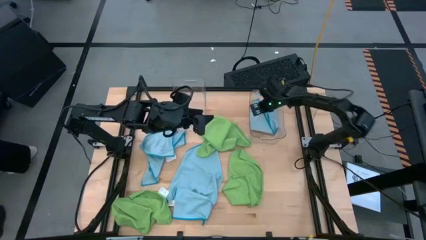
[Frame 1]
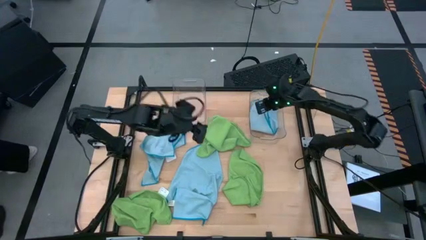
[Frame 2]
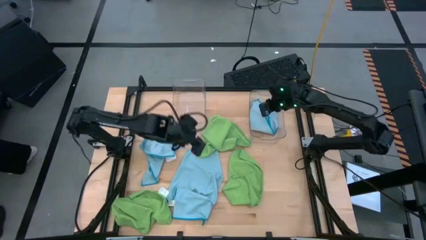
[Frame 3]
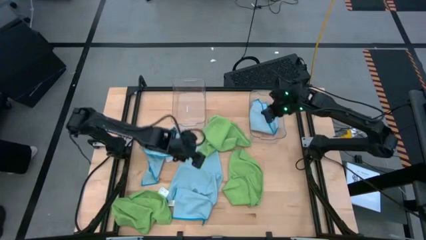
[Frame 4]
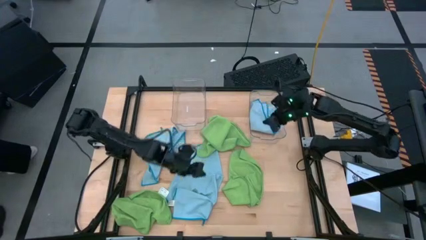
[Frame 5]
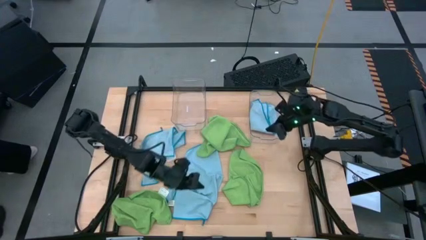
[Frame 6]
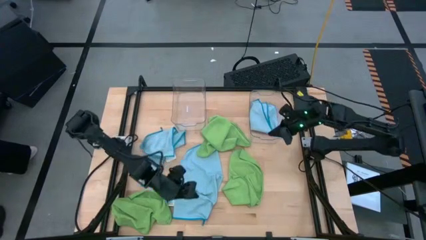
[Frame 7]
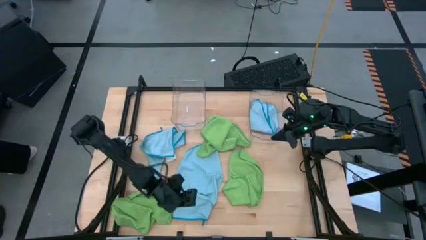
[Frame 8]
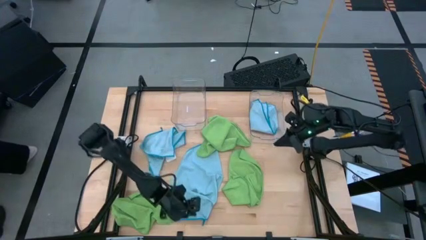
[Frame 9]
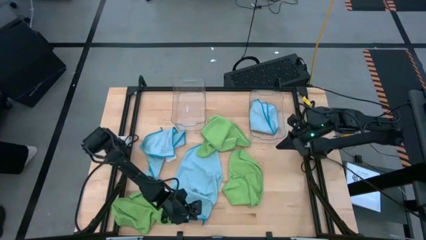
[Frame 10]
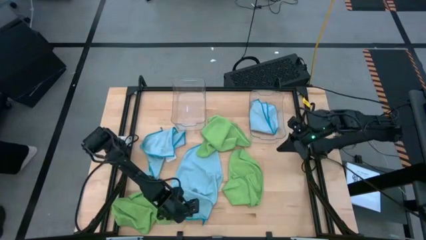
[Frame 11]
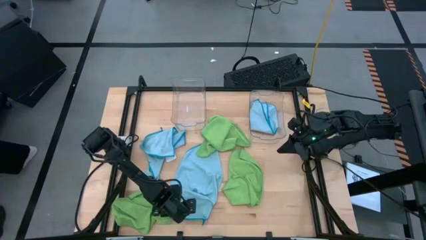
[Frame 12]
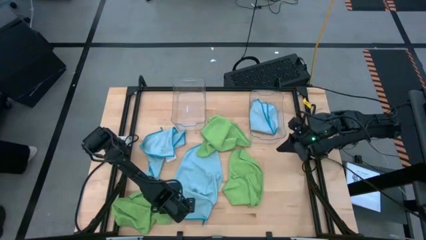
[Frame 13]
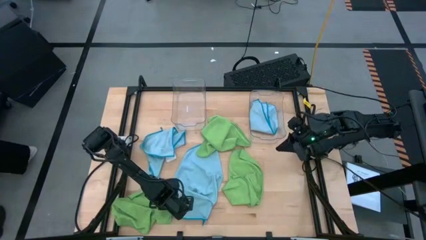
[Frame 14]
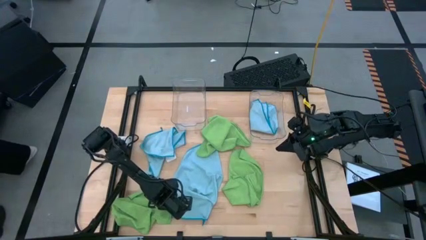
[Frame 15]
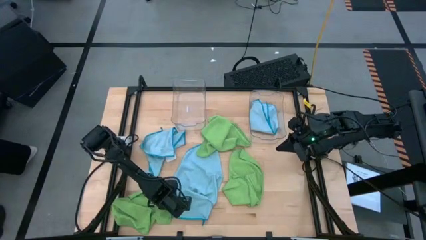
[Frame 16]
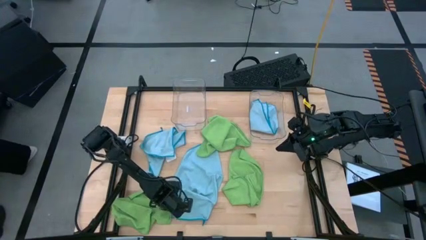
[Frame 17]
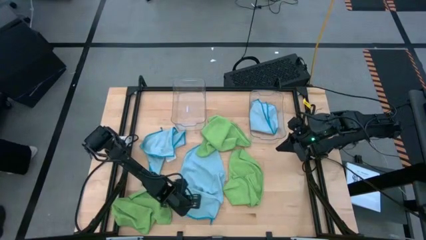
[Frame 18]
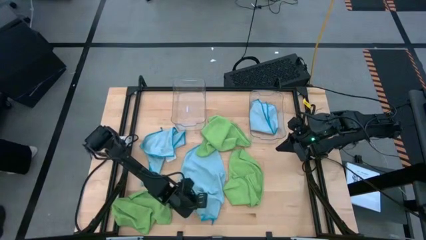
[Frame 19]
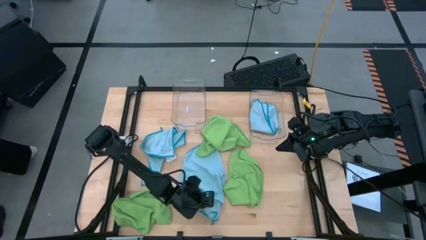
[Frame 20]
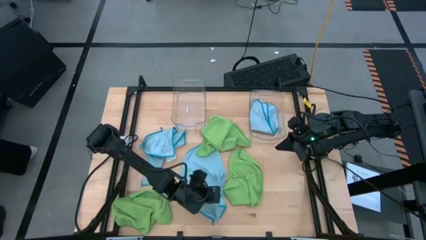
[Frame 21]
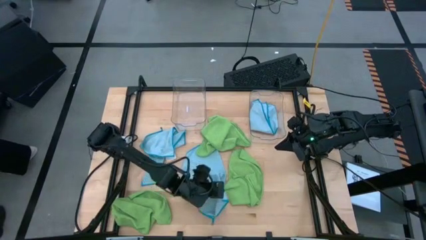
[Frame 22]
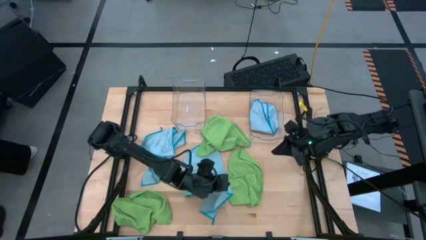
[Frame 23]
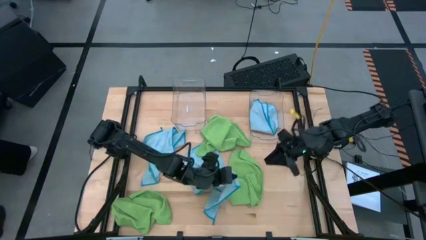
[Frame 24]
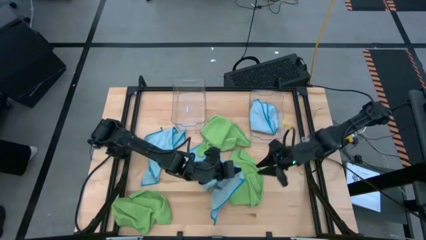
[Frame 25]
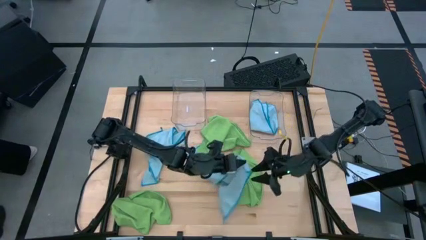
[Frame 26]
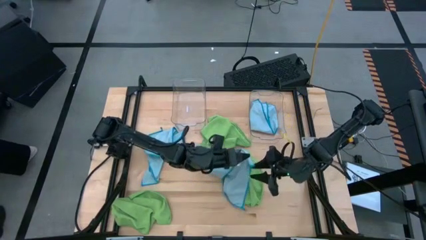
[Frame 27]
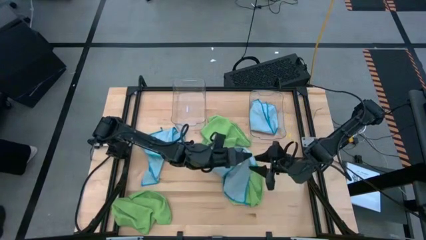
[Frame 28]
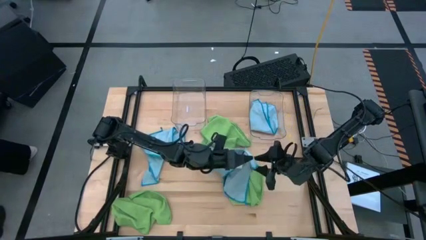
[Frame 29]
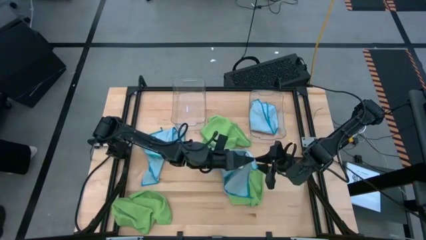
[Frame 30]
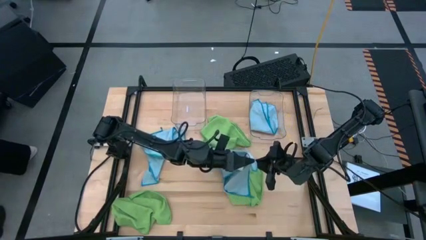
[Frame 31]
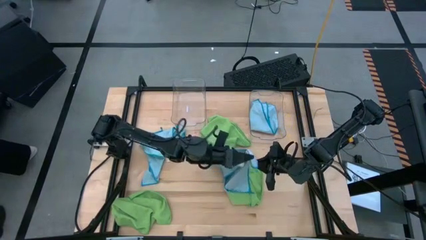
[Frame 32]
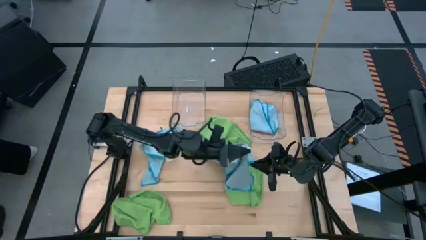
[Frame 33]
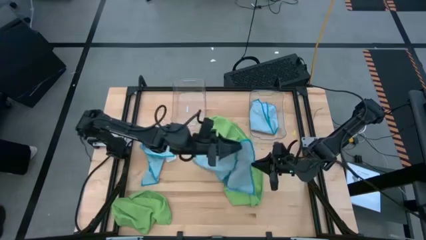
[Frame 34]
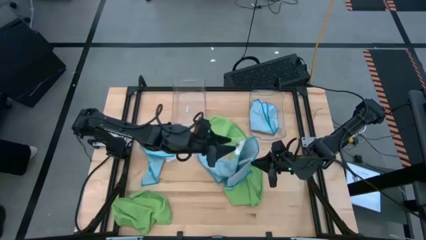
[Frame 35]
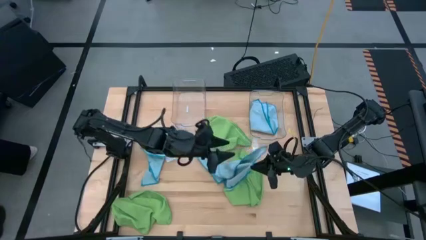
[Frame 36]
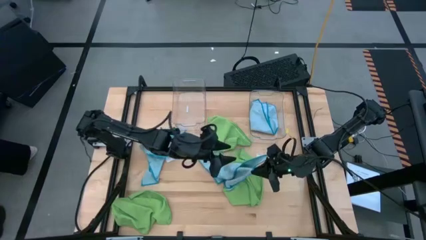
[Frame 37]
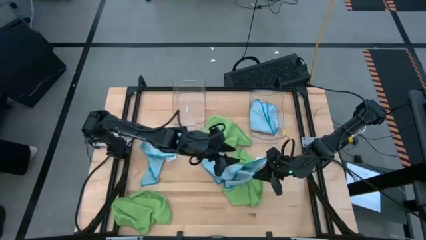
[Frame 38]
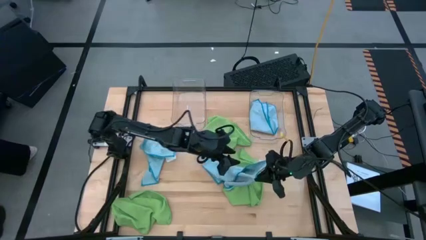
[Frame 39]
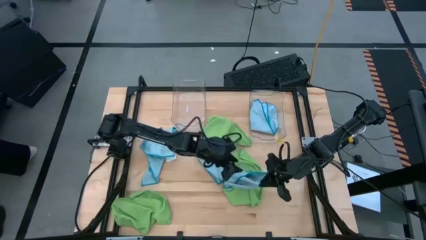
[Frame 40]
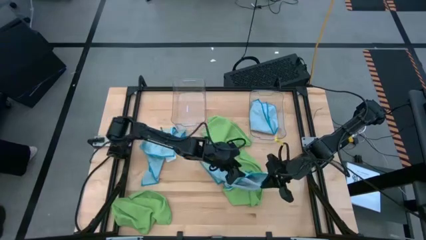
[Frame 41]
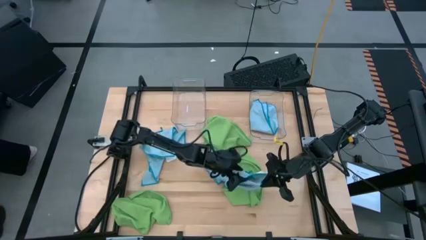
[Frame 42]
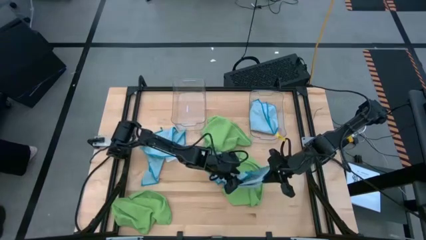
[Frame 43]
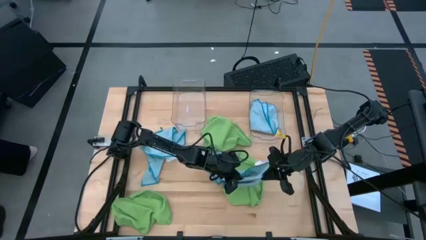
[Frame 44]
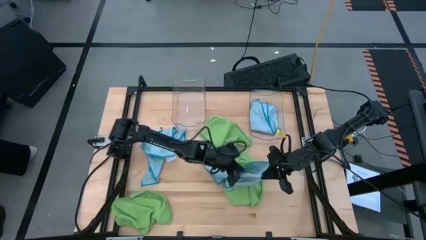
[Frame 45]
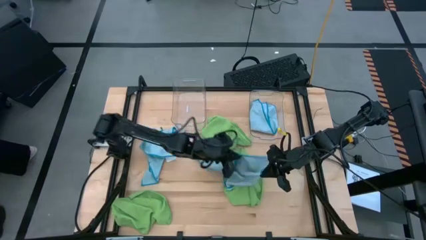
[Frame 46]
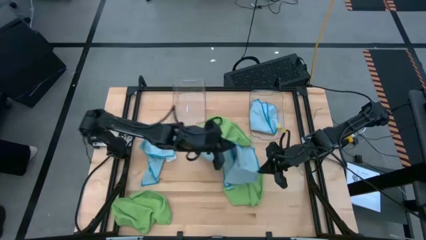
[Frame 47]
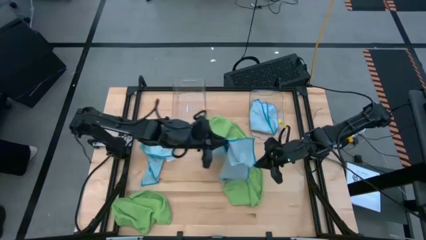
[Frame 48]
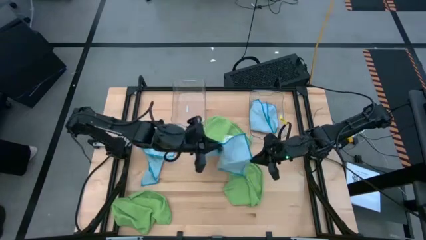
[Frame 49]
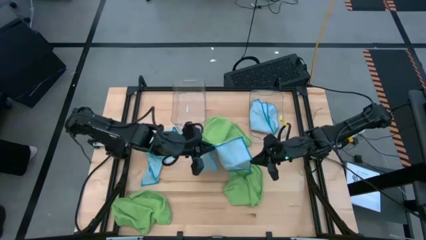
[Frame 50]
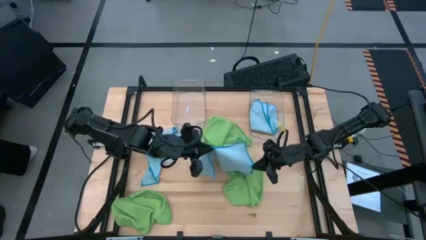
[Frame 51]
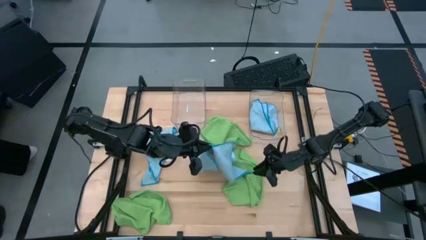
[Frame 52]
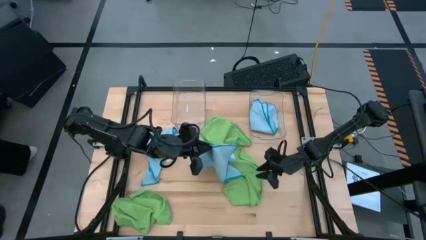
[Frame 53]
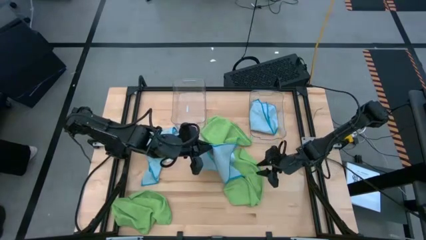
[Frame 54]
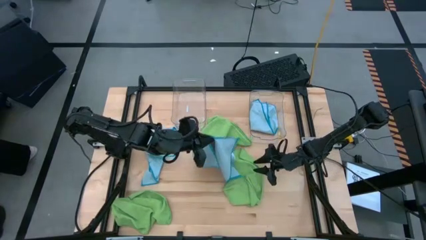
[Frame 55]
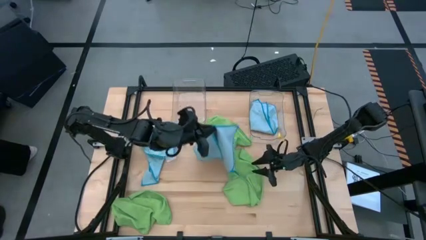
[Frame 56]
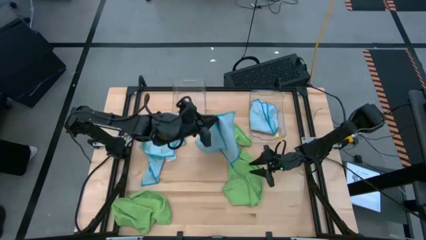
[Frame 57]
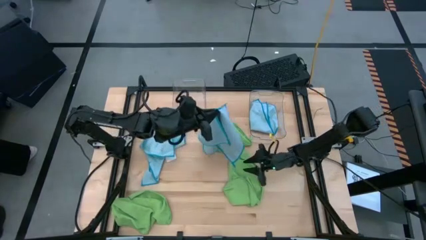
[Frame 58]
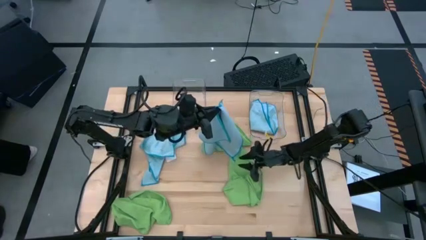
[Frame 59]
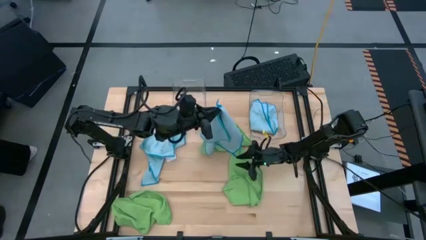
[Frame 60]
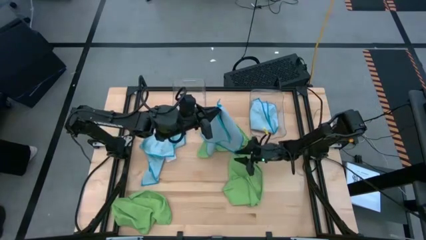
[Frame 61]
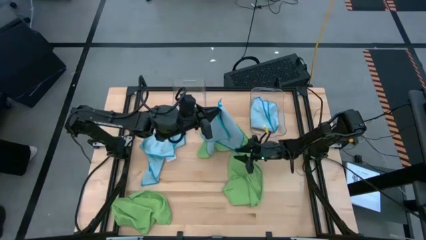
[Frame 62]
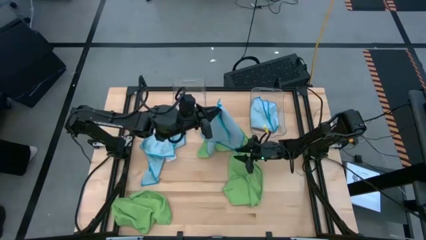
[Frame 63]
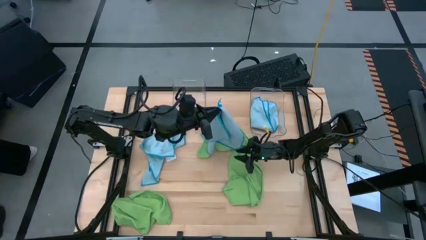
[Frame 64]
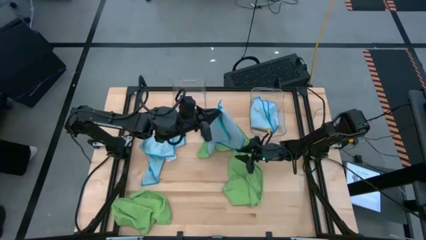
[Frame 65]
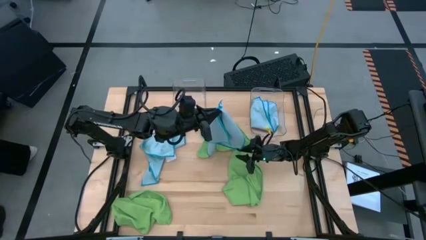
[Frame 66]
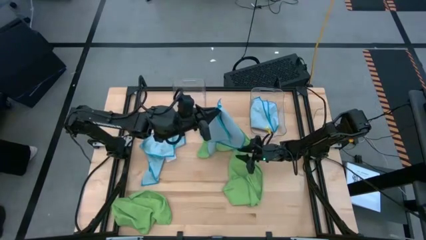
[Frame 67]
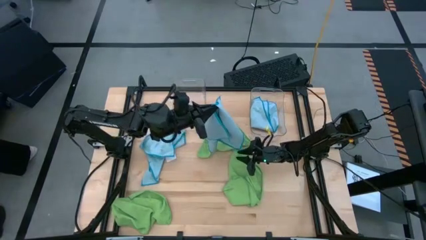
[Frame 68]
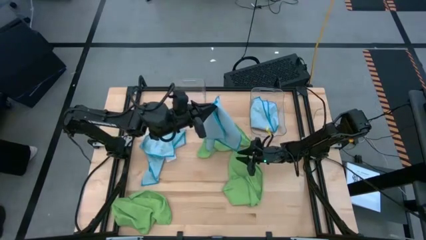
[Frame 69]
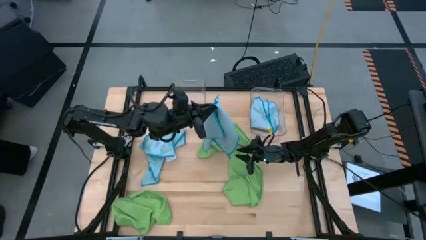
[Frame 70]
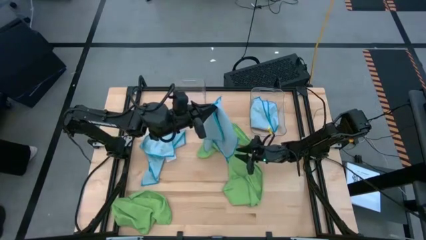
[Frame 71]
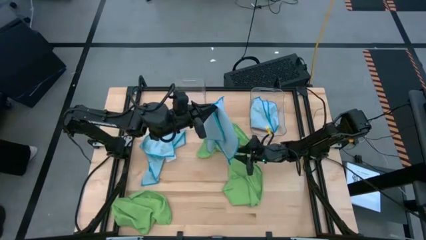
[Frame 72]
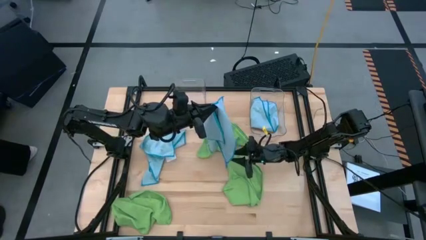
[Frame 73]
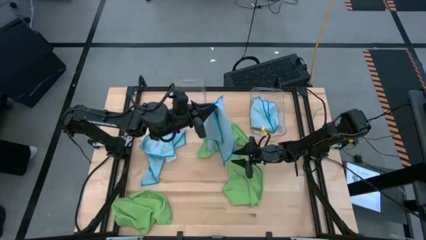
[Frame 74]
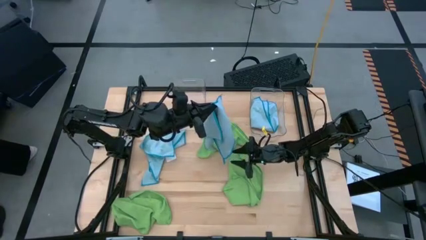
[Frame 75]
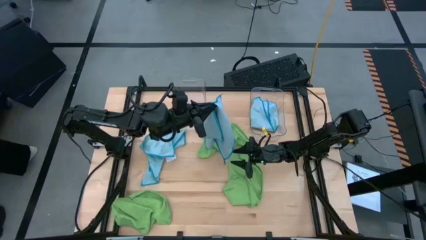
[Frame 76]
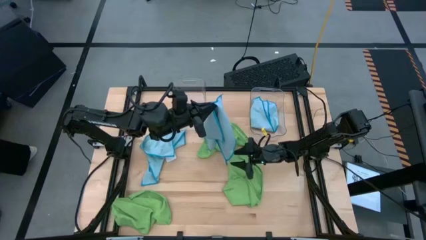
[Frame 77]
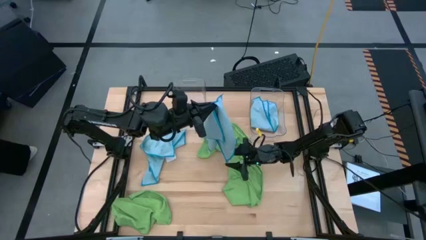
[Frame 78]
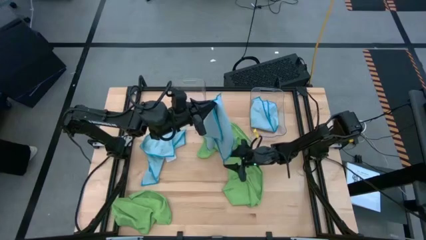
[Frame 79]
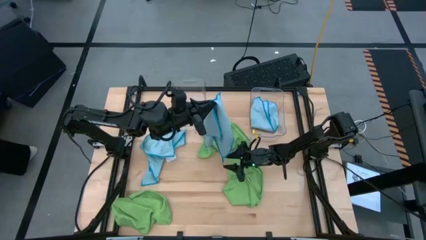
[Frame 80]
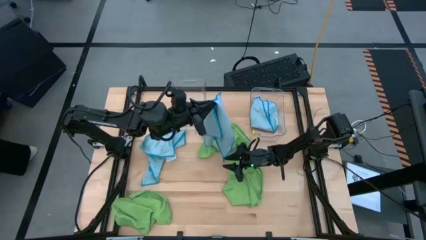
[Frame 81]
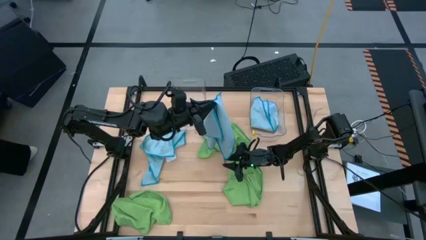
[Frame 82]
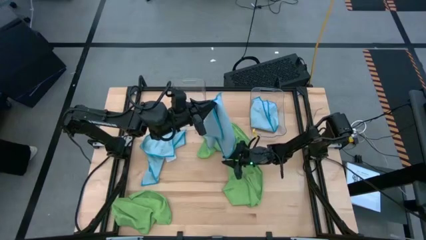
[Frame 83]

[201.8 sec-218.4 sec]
Task: Fold microfiber towels
Fold the right blue microfiber towel

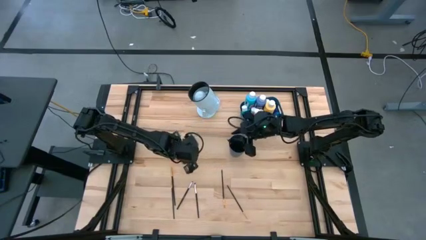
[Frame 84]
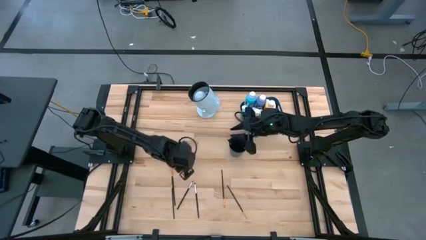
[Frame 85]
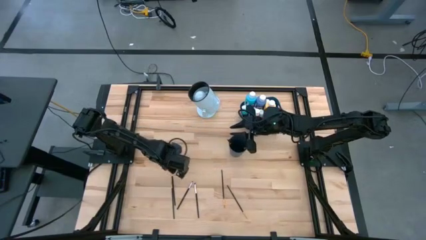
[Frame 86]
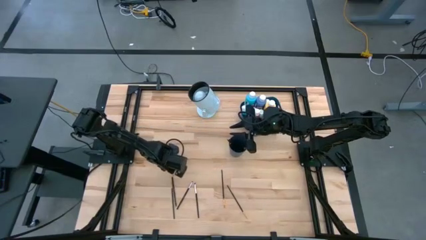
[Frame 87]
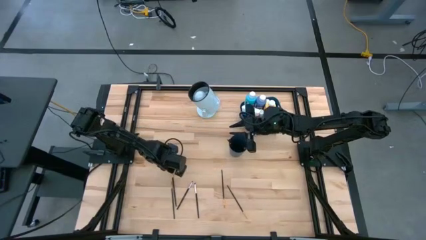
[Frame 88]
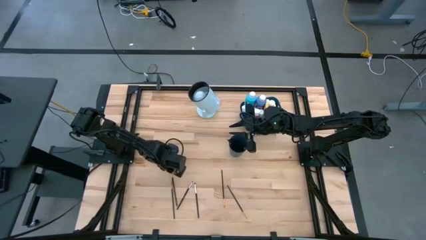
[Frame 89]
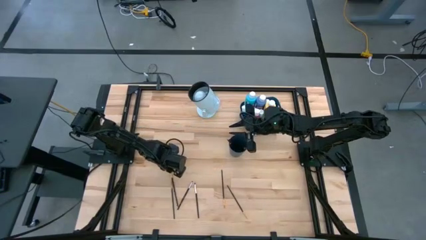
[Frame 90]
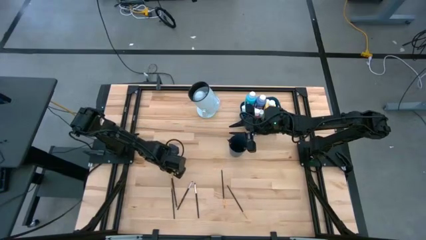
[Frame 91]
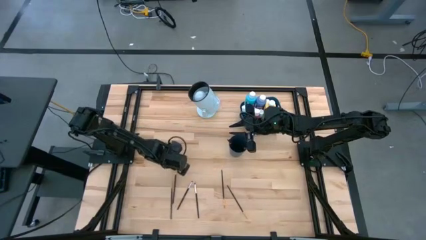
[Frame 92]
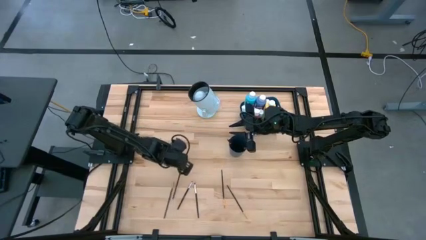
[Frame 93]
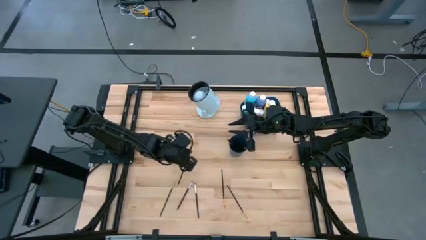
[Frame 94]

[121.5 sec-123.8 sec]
Task: Pick & Place Paint Supplies
Put the gold paintbrush into the blue cup
